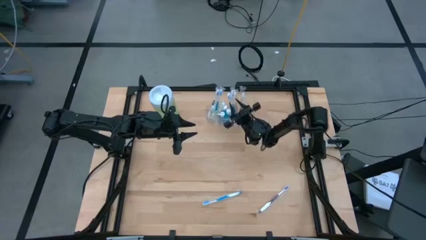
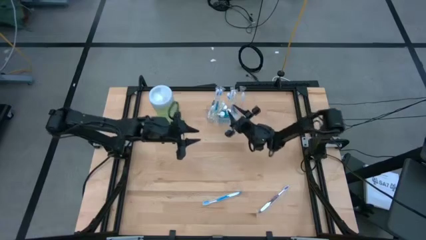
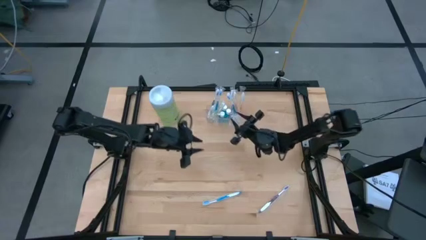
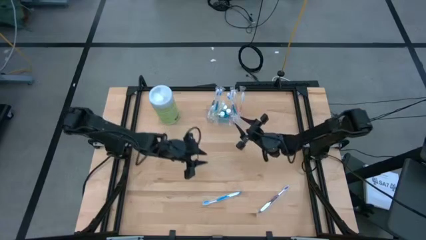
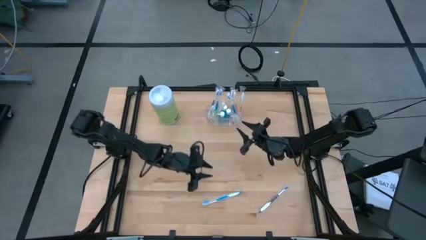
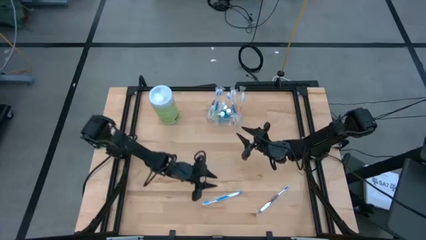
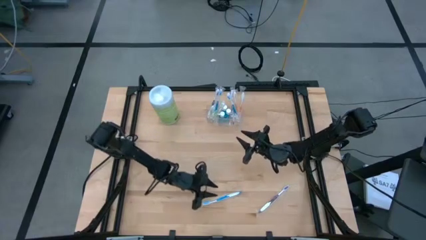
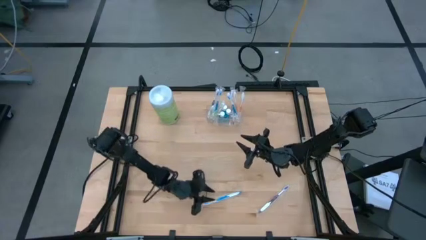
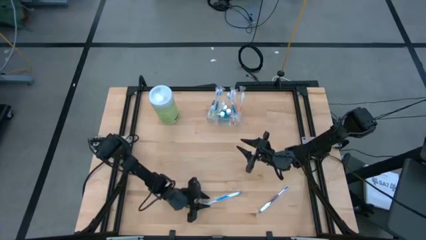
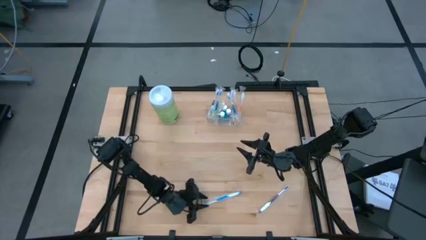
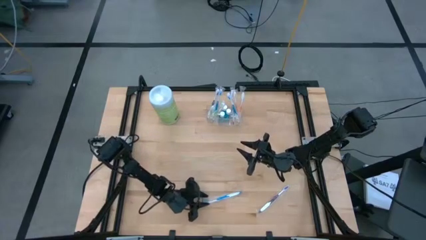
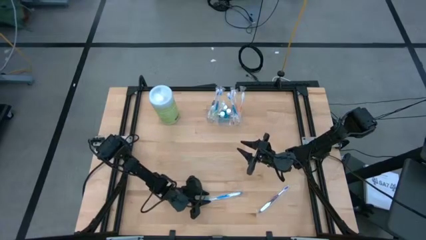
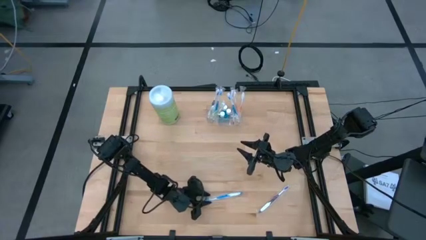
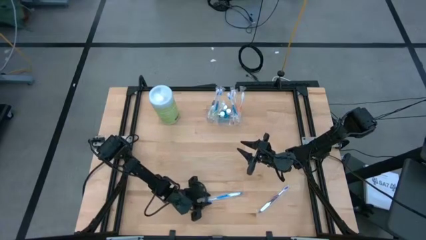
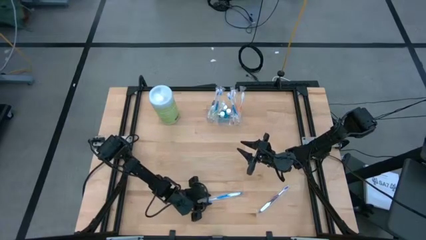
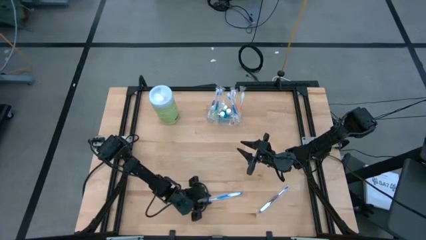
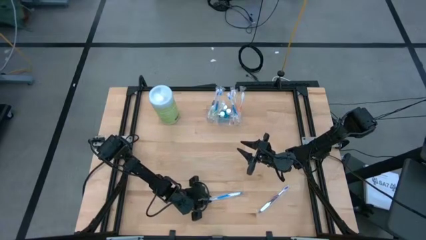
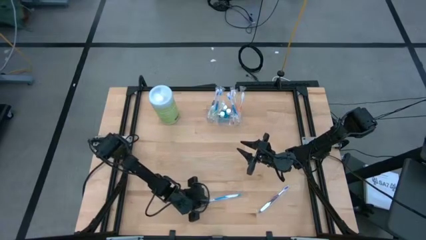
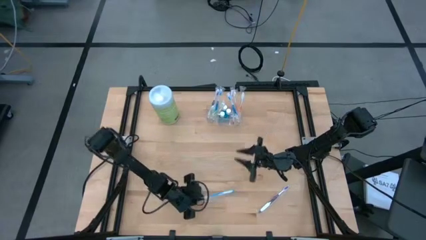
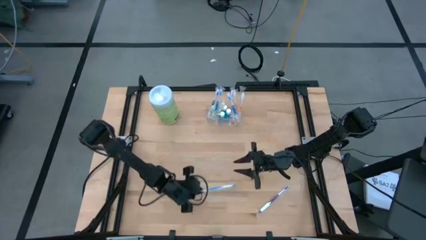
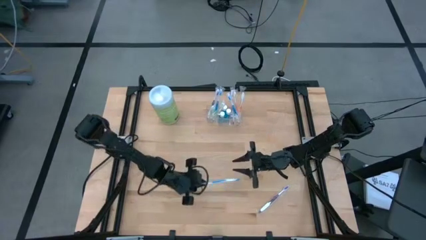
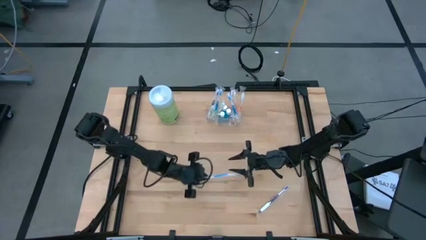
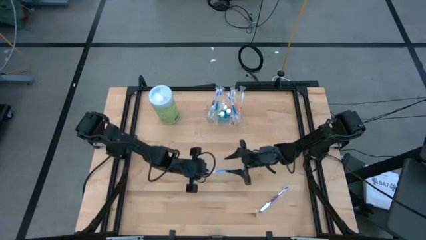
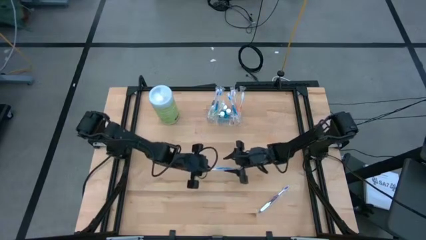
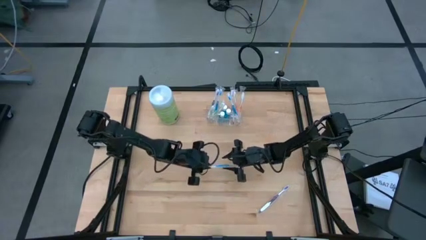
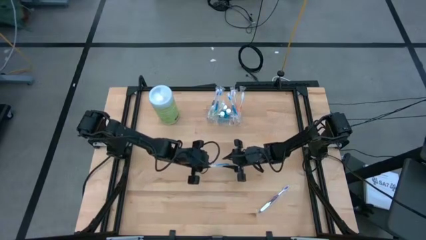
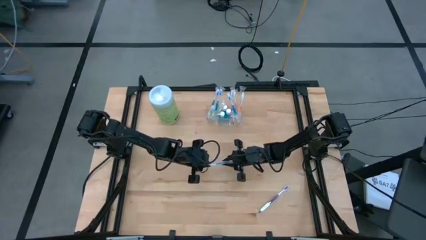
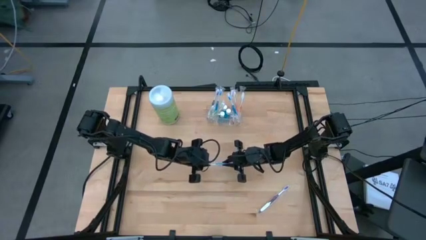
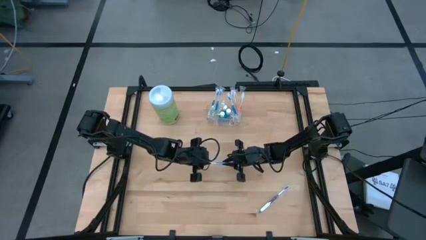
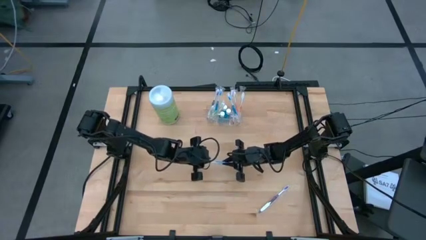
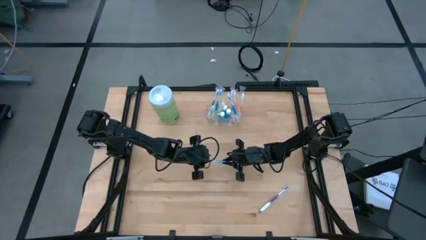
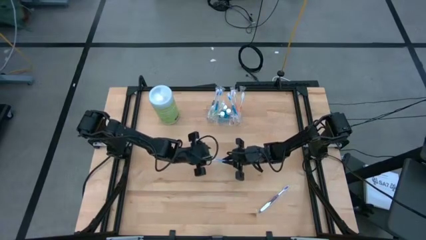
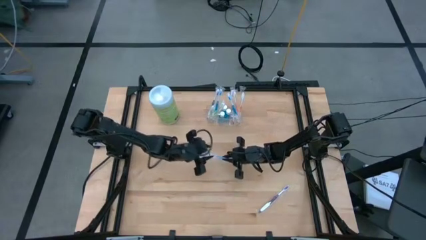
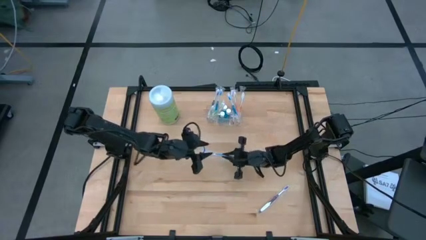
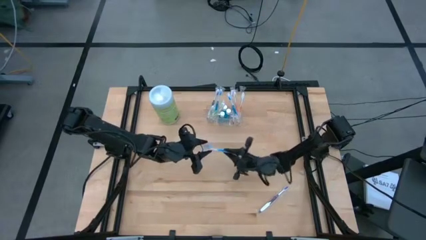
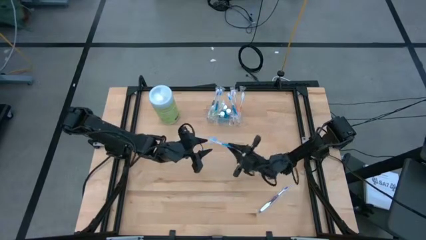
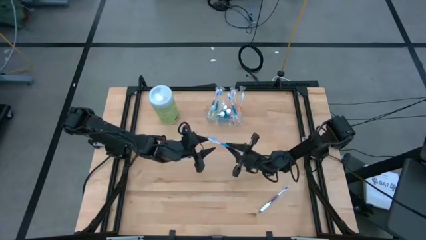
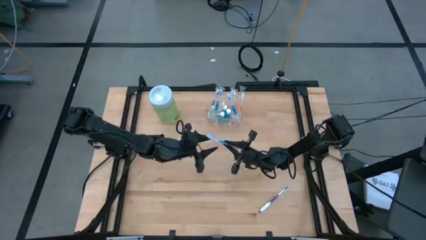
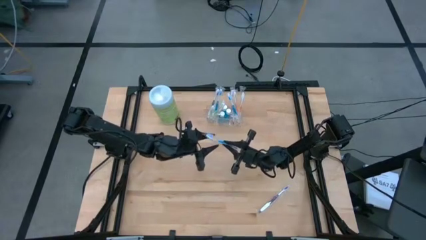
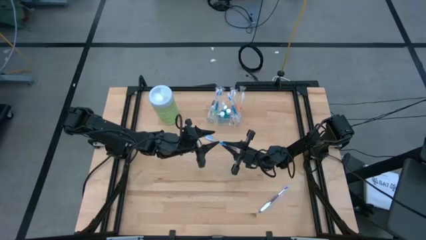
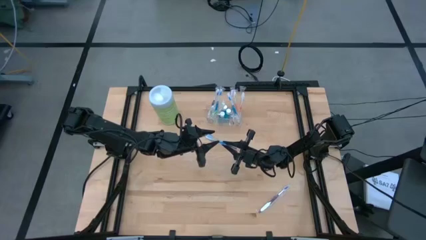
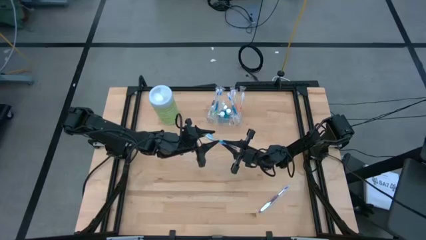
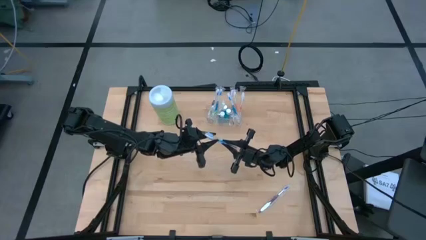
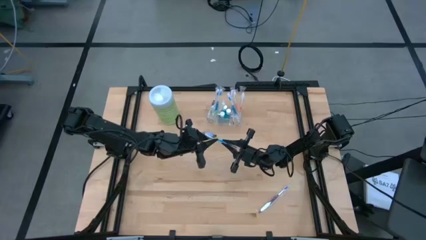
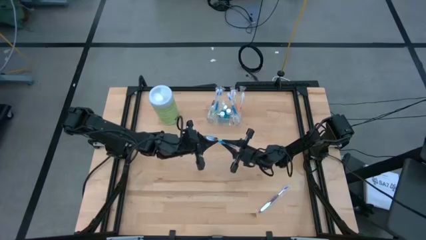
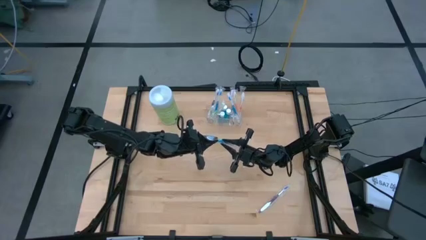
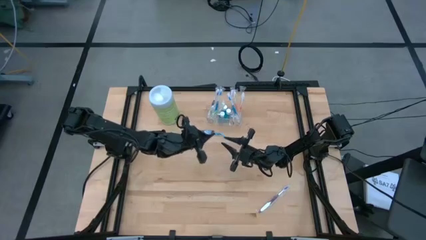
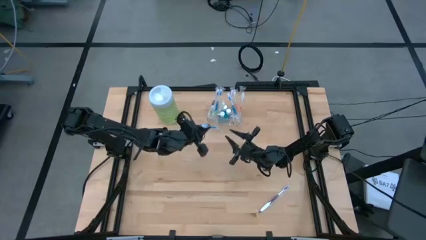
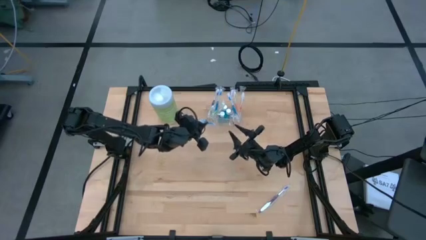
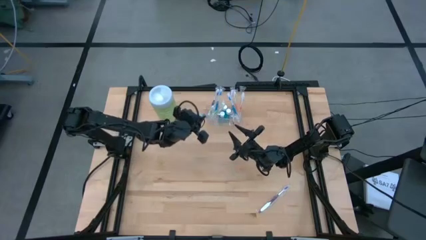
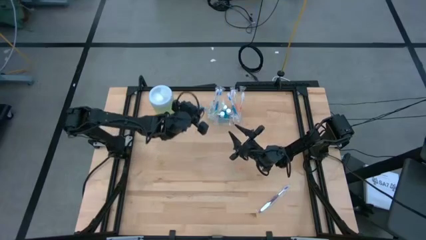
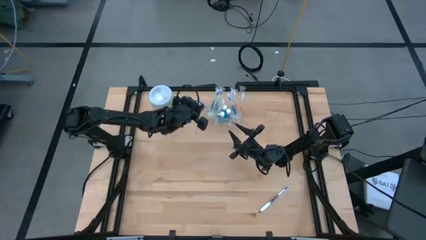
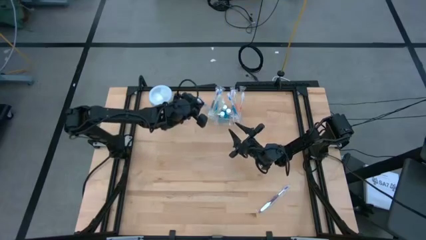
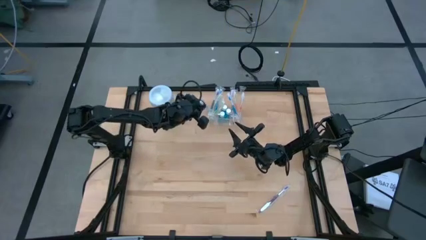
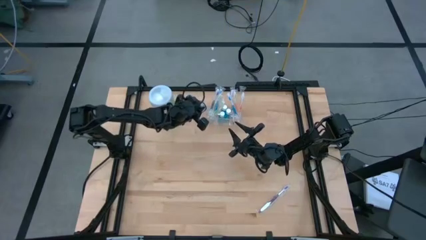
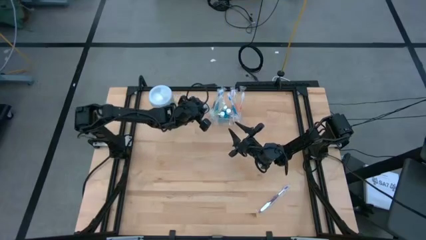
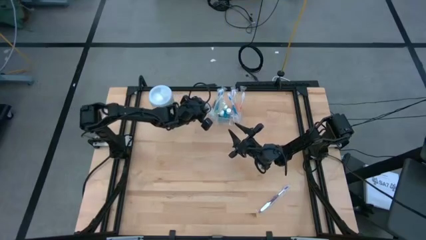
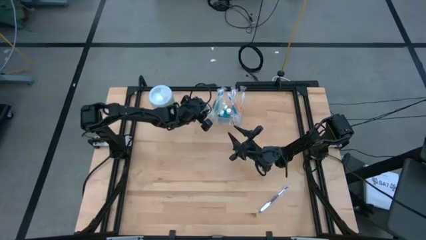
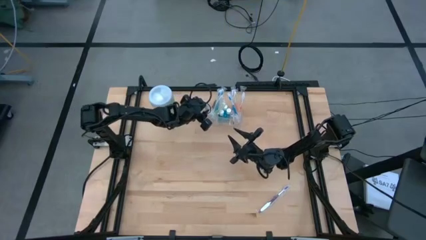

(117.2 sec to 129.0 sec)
Task: Pick & Place toothbrushing station
Put the blue toothbrush into the transparent organizer

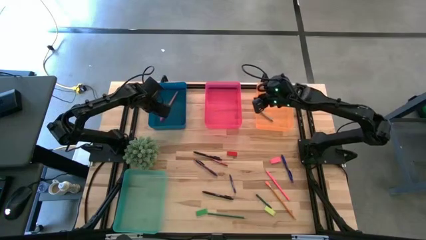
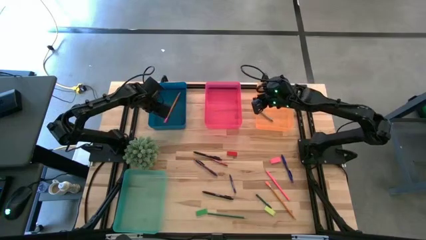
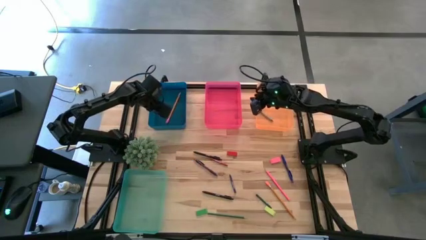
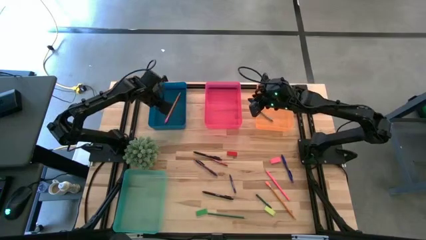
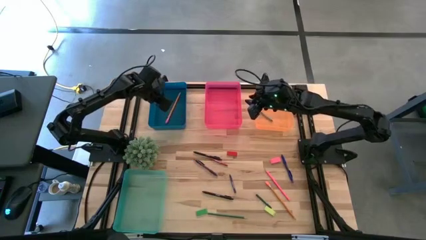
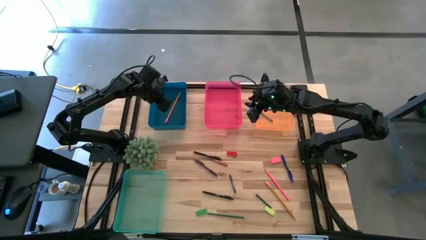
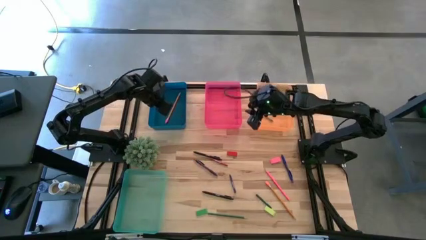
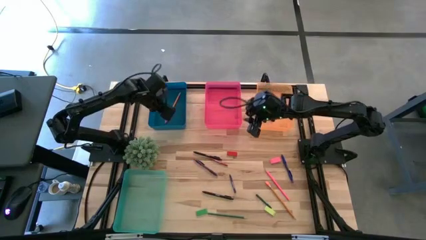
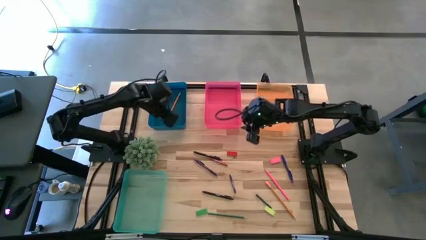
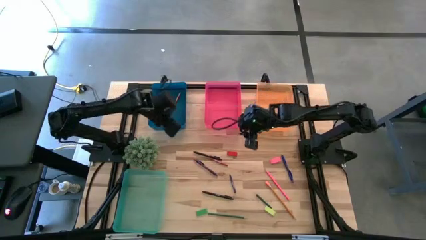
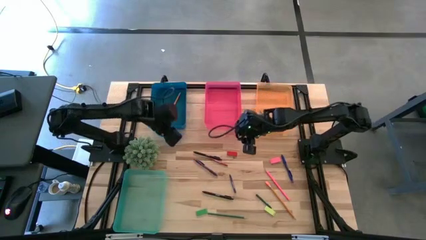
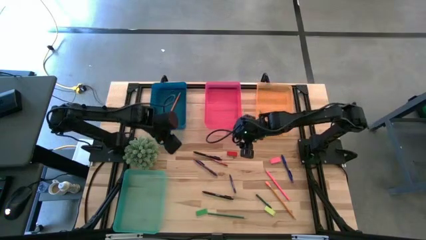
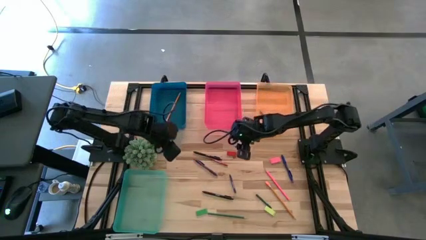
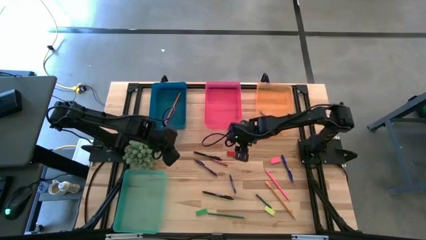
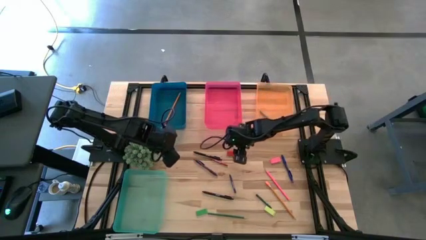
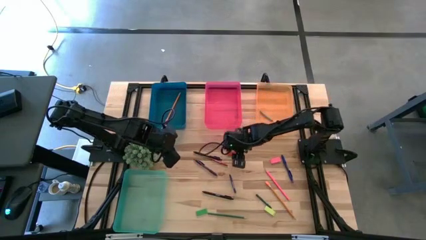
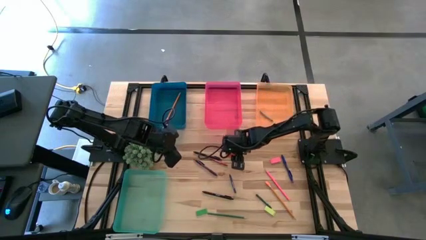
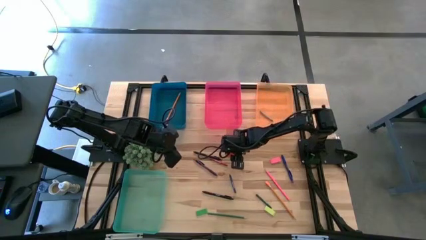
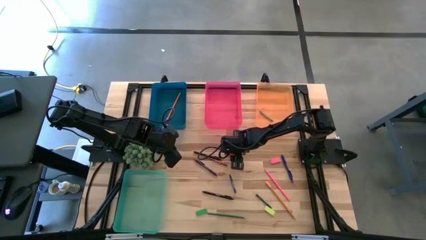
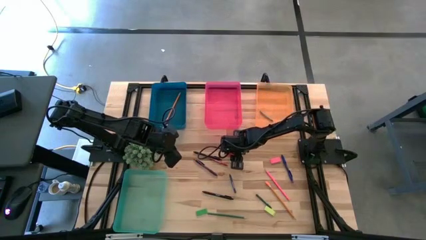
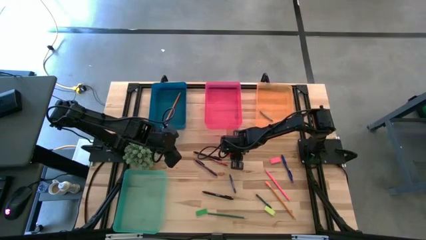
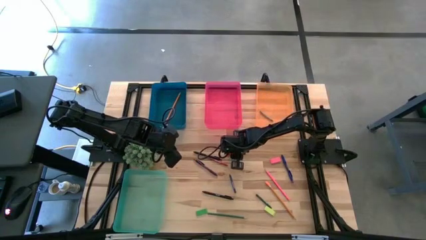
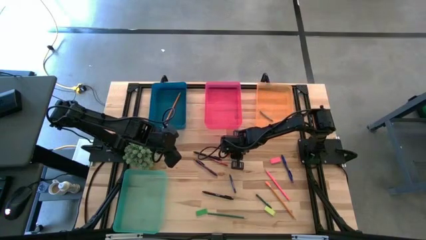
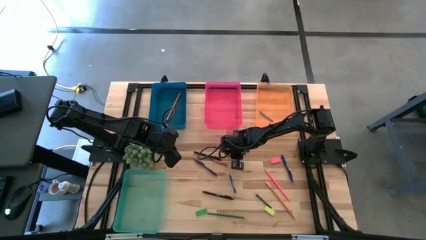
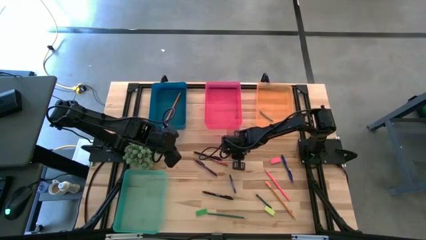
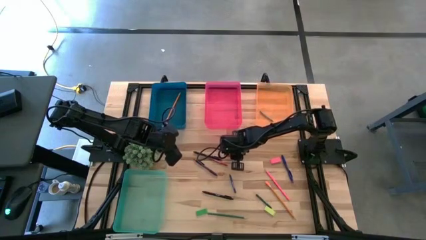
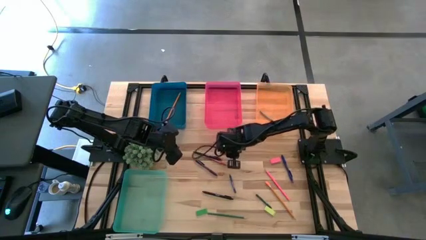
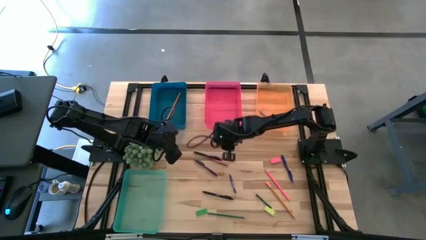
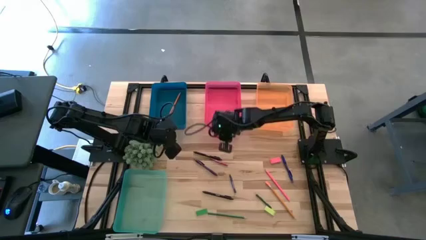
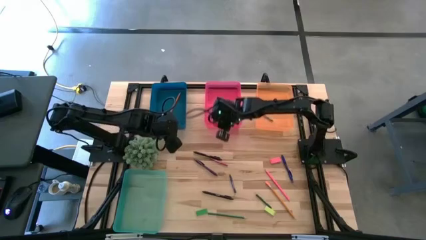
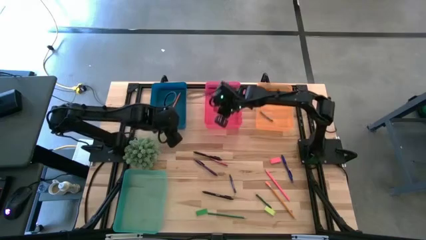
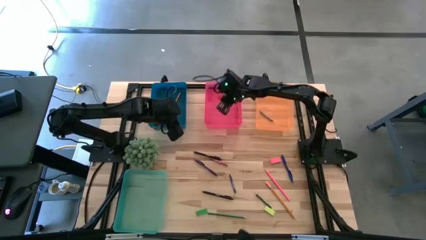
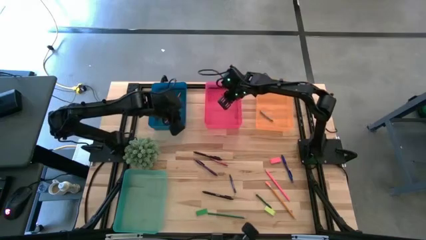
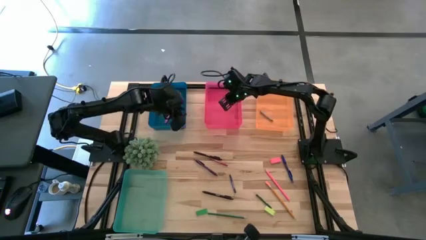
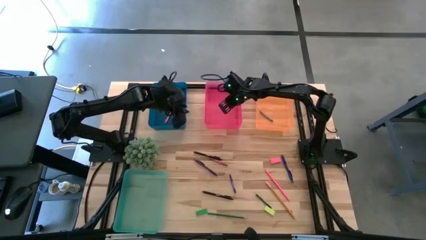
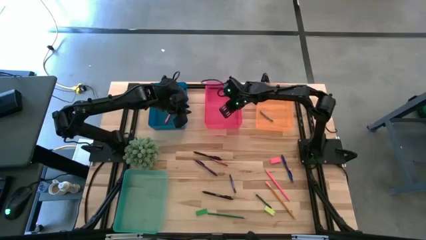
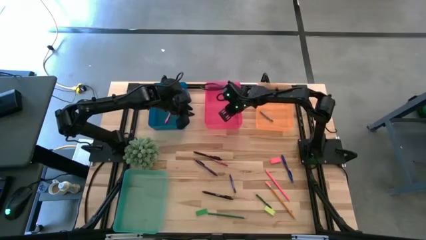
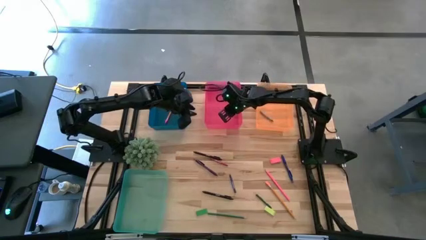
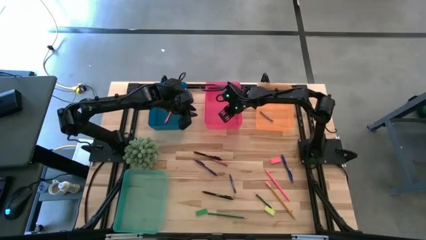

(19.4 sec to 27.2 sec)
Task: Sort crayons/erasers/pens/pencils in bins
Put the red eraser into the pink bin
